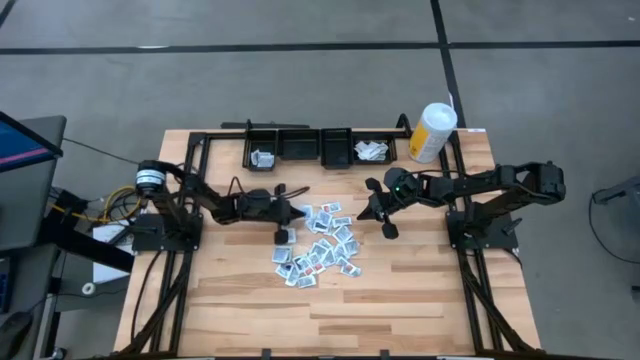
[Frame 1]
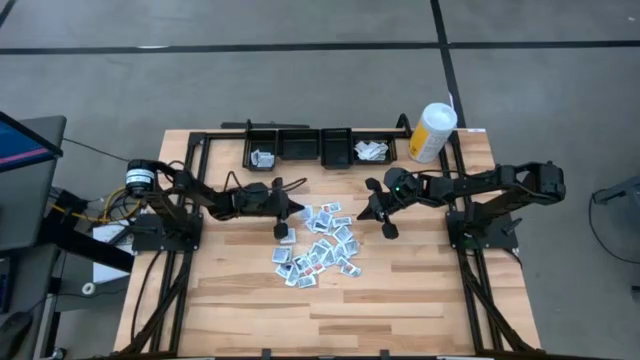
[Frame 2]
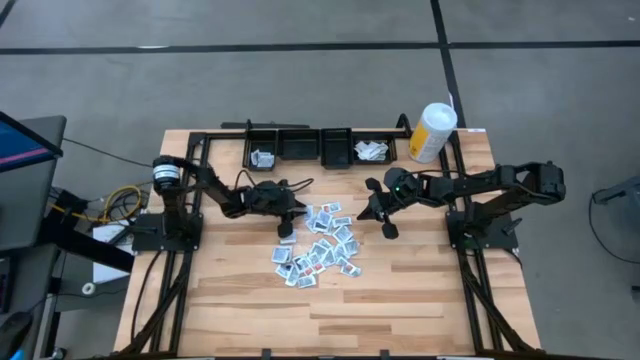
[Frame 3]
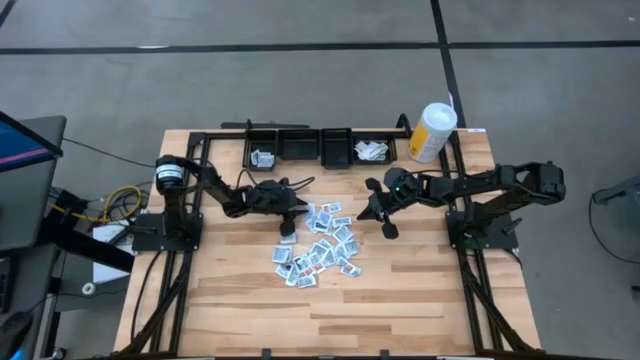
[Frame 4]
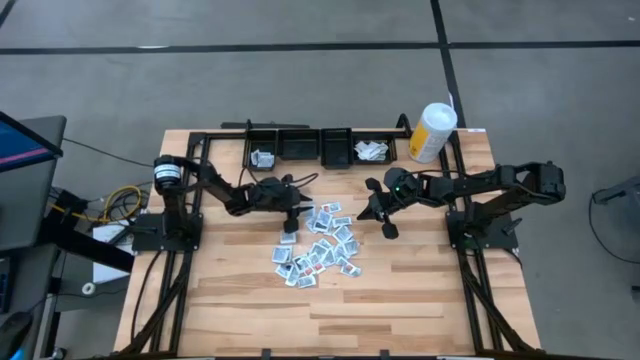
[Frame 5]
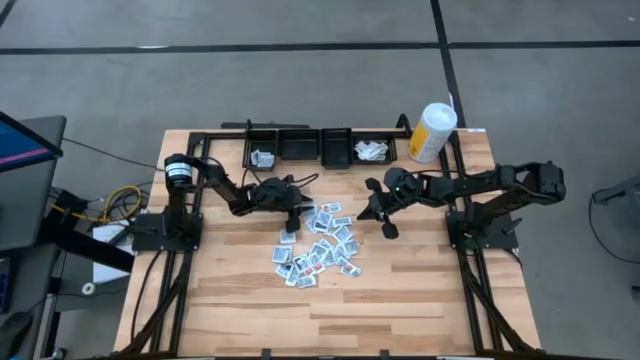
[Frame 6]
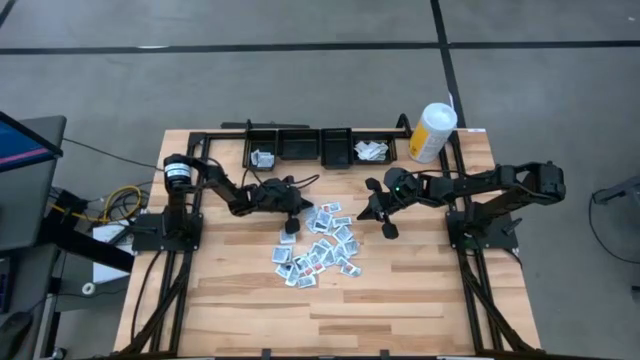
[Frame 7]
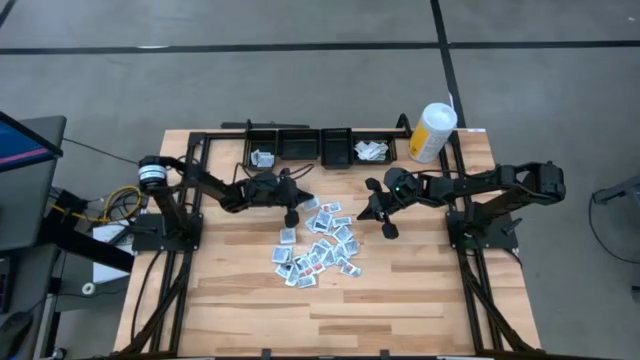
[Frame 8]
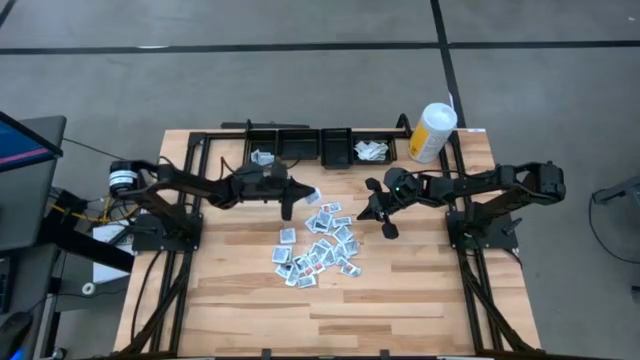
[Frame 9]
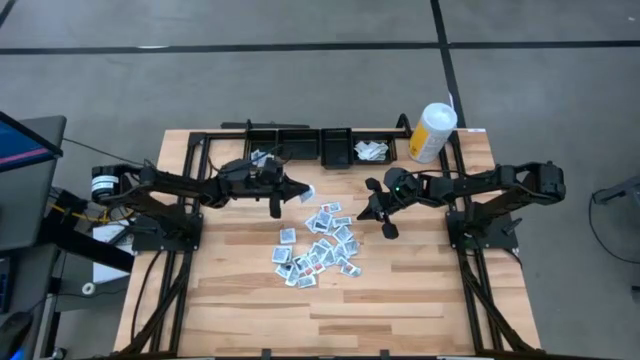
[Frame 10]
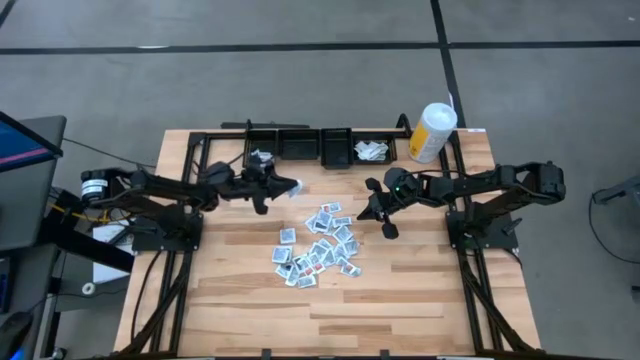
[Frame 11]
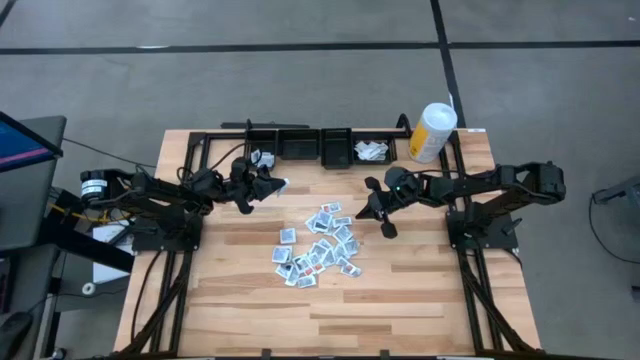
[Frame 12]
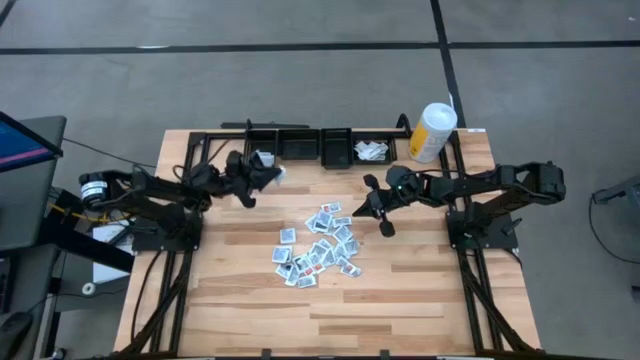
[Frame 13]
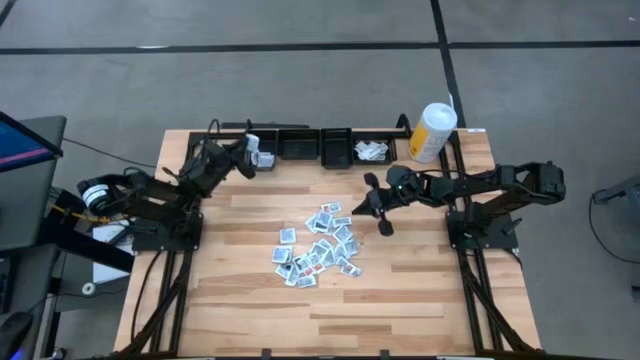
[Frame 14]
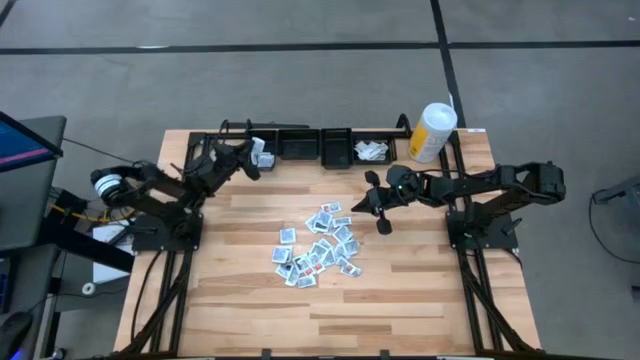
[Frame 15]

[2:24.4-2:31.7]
Task: Pick & Place First Aid Supplies
Put the blue alcohol pad into the left black bin

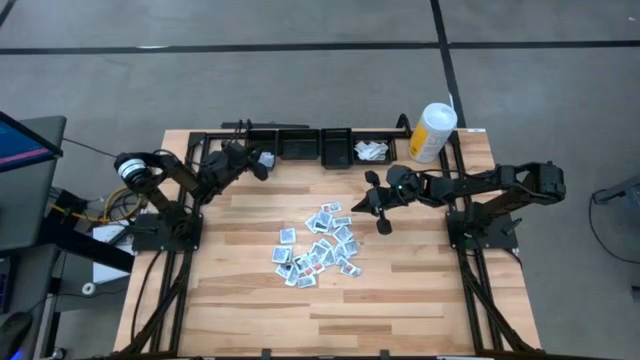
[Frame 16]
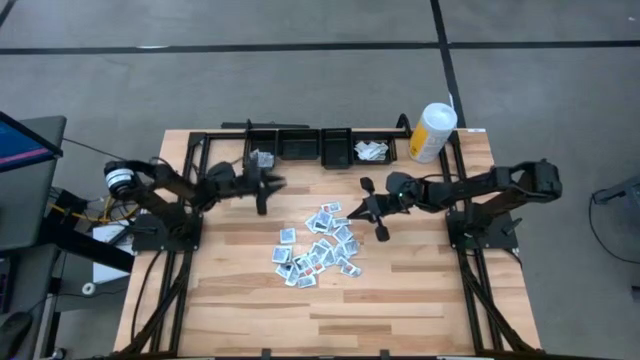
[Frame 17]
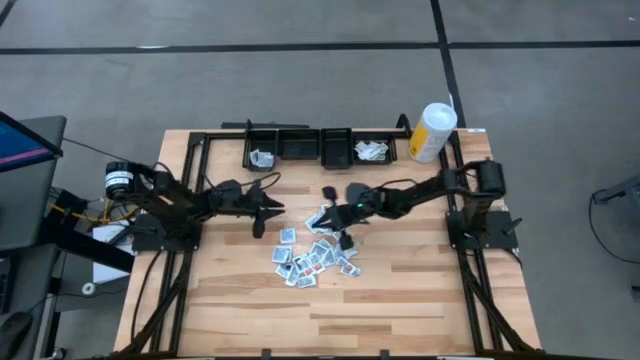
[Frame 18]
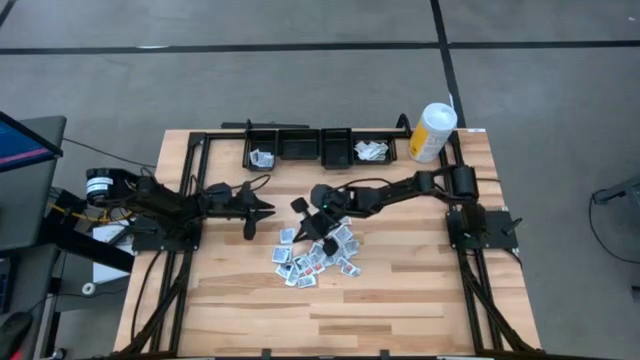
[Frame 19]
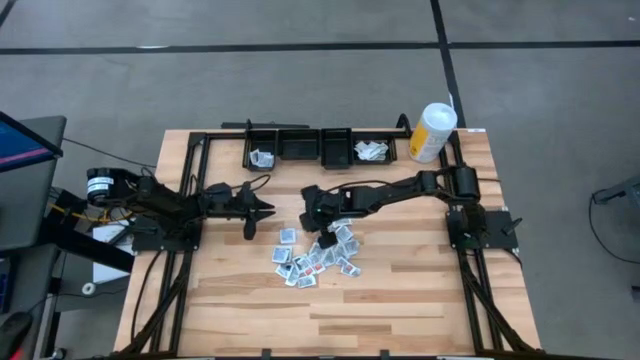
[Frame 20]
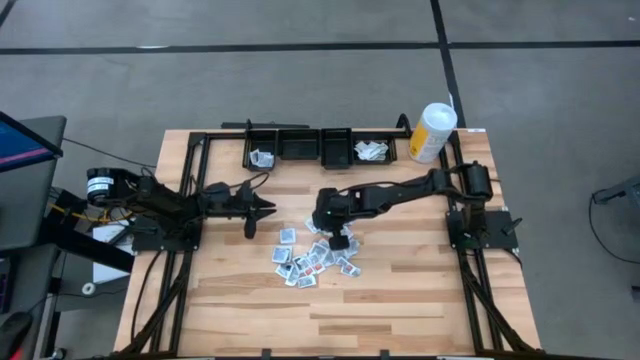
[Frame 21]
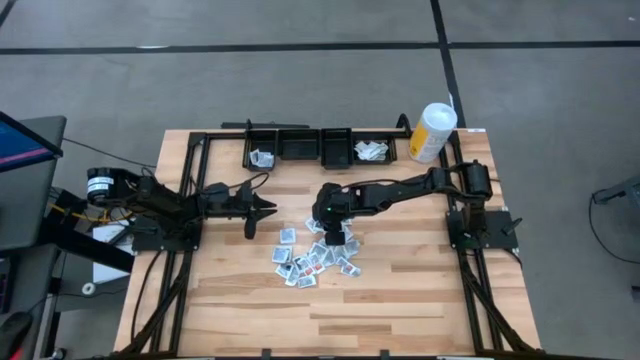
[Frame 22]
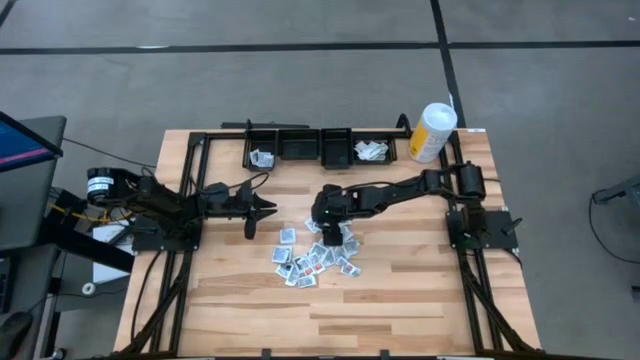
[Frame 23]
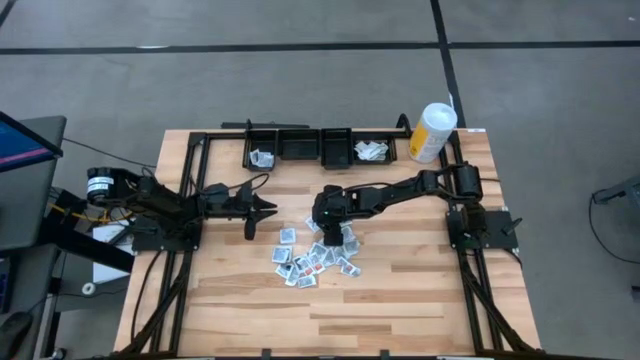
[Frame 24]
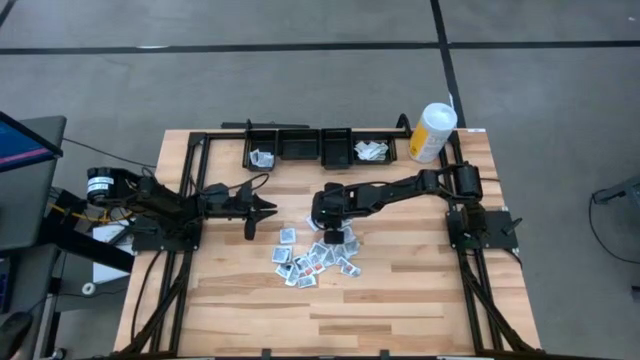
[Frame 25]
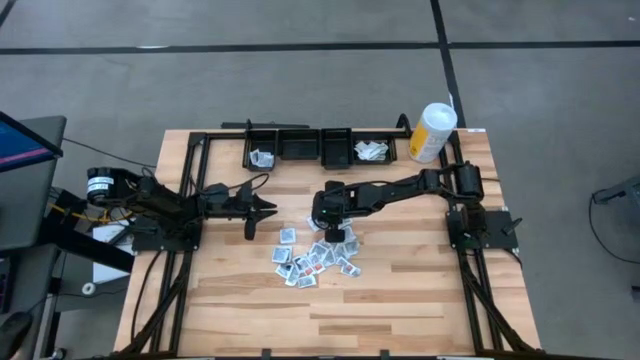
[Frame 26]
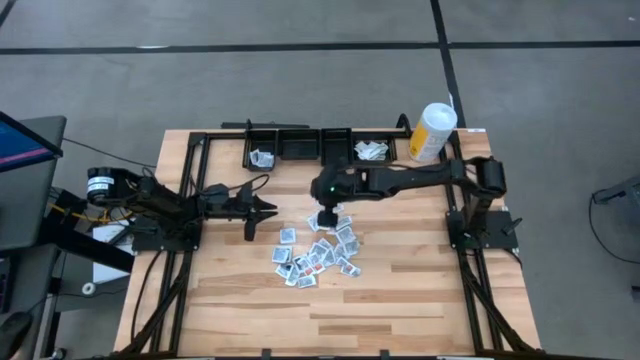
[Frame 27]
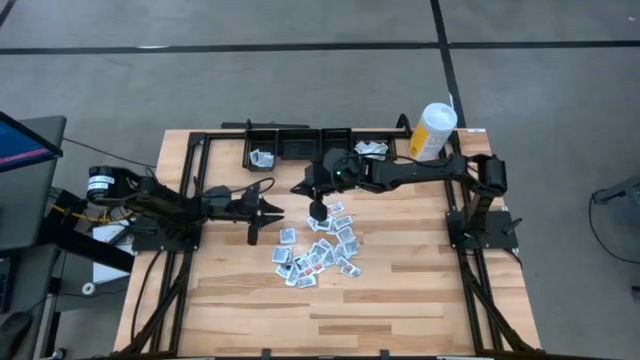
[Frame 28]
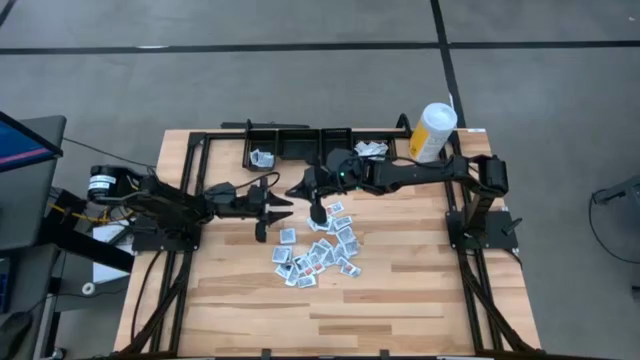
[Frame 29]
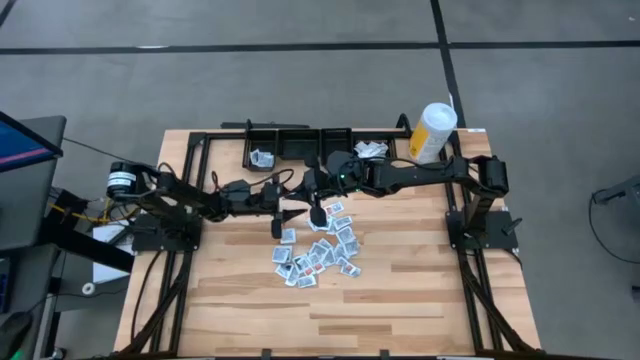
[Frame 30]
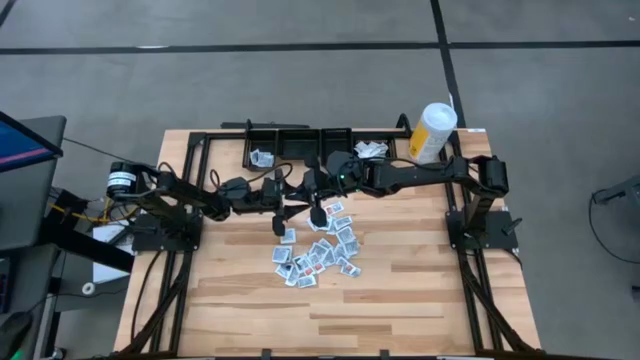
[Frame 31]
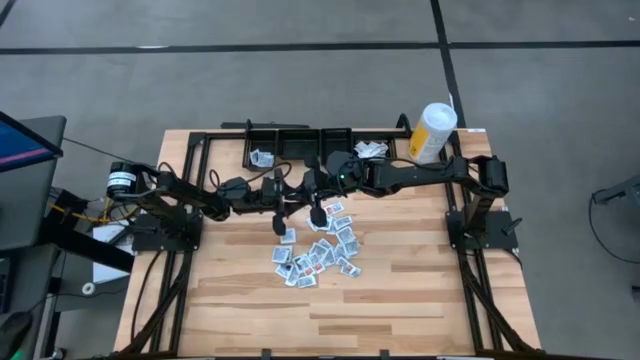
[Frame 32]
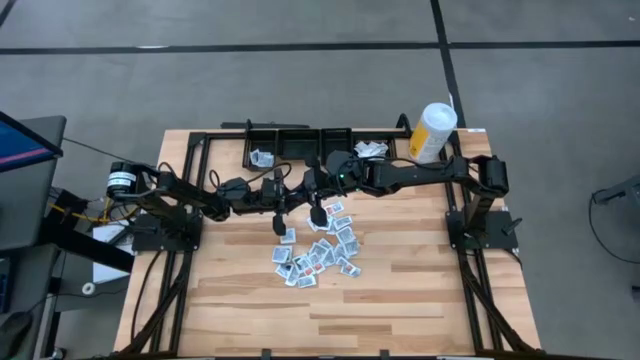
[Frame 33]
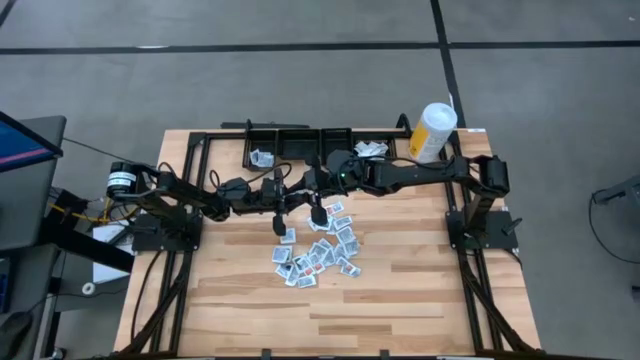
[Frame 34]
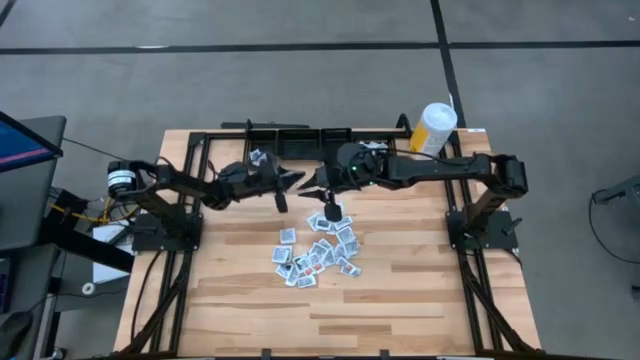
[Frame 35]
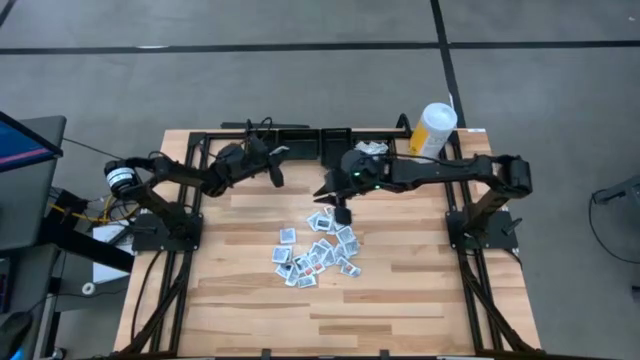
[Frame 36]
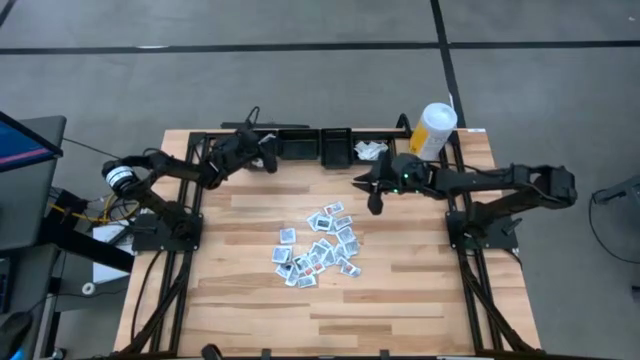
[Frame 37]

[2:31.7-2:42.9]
Put the blue alcohol pad into the left black bin

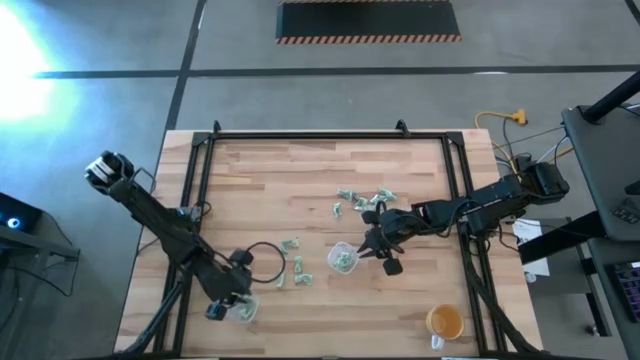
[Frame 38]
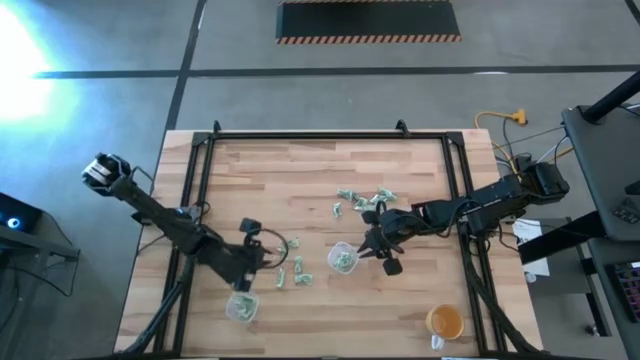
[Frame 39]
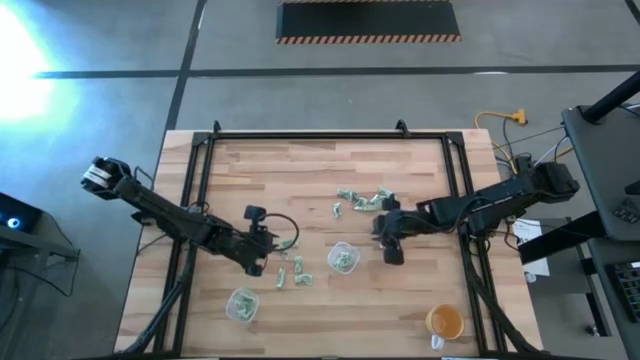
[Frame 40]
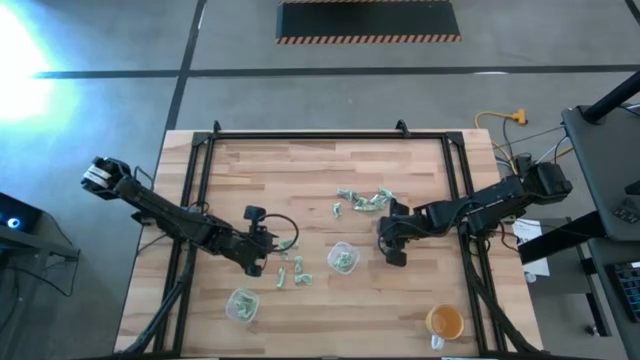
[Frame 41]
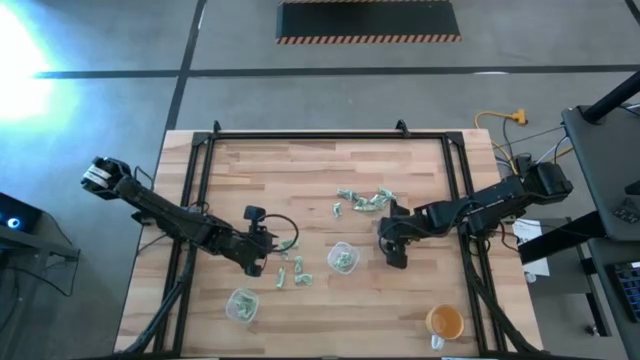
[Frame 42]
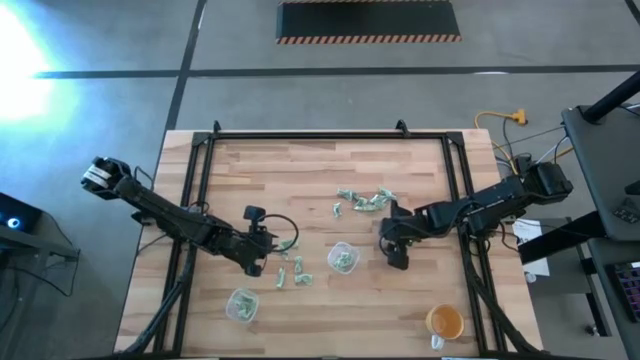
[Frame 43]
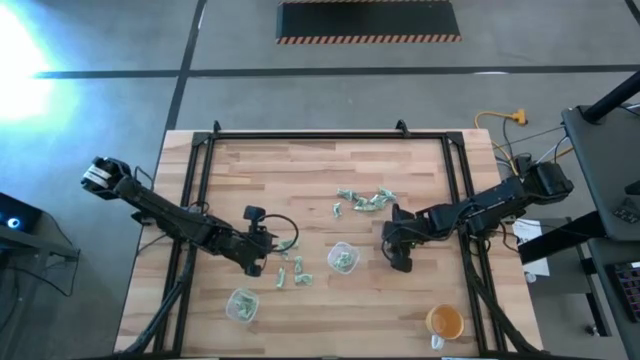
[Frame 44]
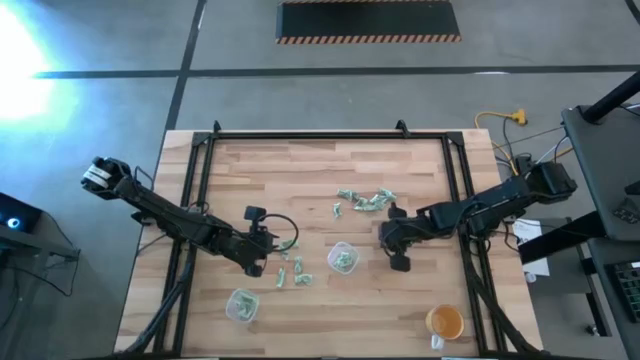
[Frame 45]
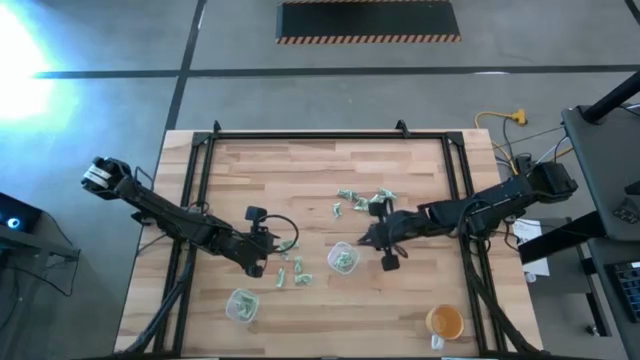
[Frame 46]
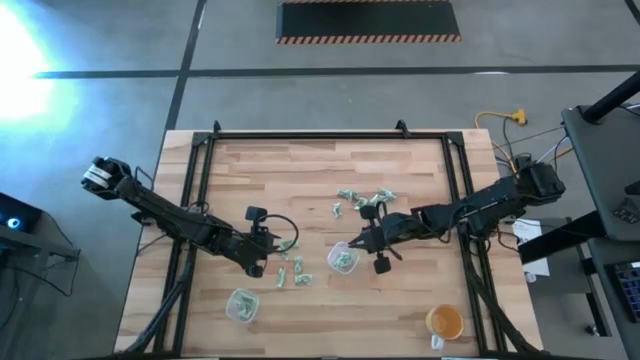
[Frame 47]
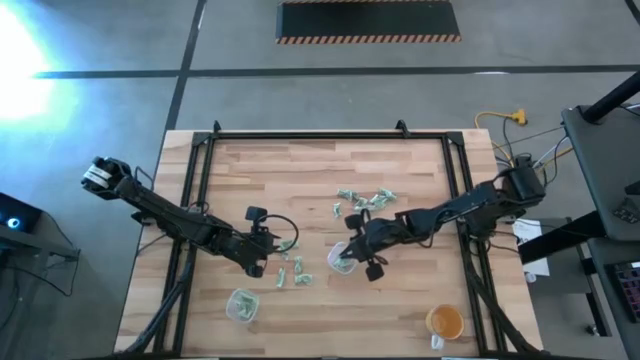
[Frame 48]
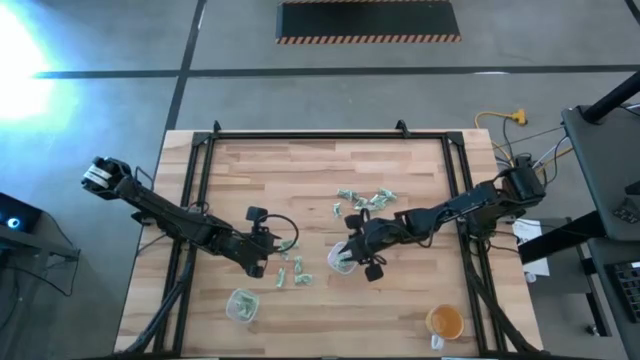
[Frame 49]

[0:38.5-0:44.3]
Task: Pick and place items into bin
Put the light green packet into the top transparent bin
